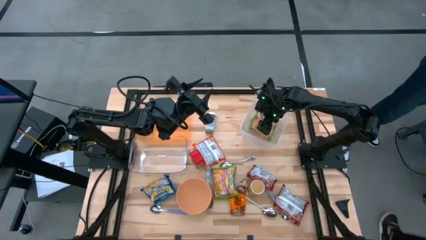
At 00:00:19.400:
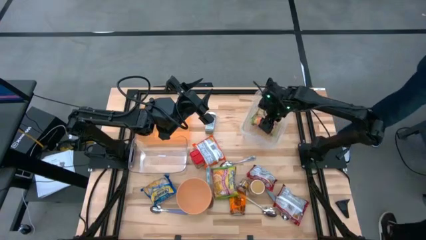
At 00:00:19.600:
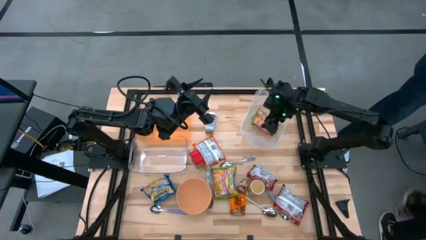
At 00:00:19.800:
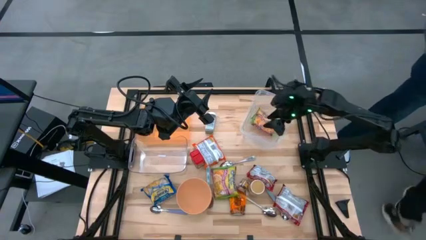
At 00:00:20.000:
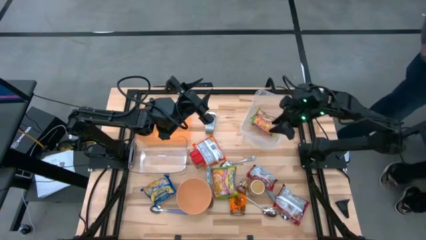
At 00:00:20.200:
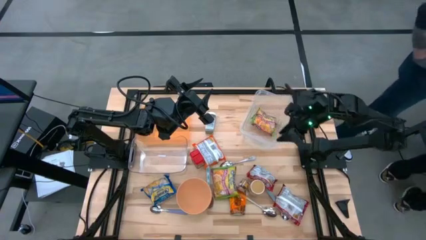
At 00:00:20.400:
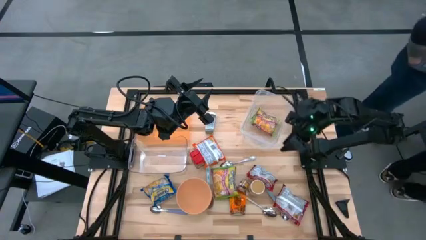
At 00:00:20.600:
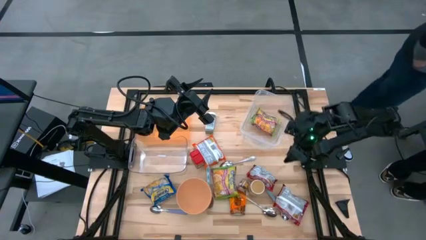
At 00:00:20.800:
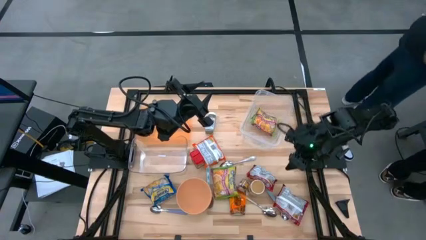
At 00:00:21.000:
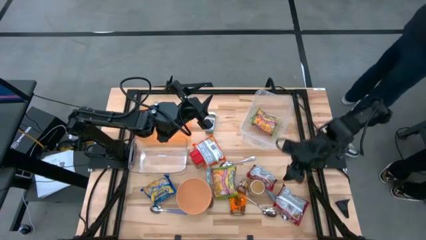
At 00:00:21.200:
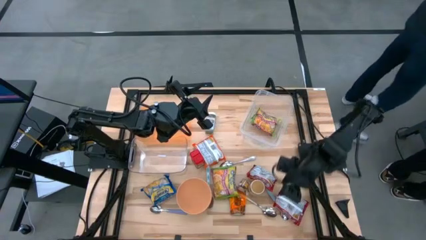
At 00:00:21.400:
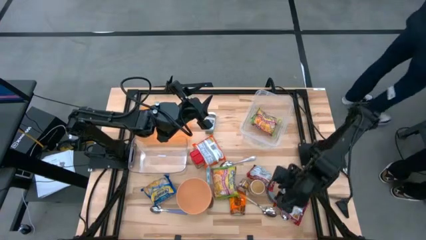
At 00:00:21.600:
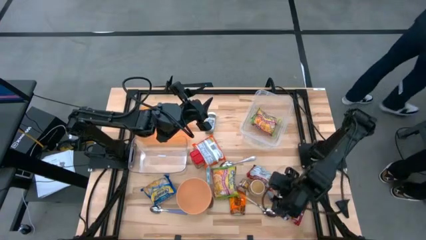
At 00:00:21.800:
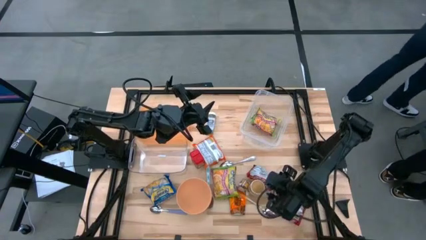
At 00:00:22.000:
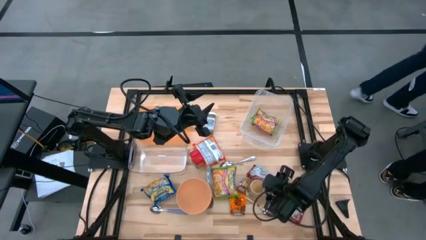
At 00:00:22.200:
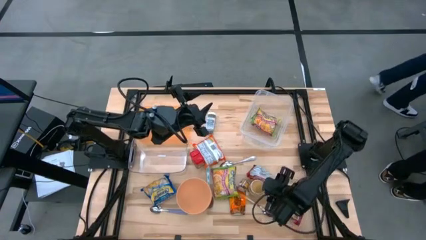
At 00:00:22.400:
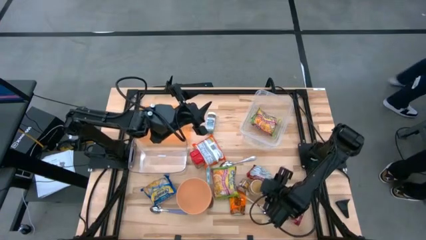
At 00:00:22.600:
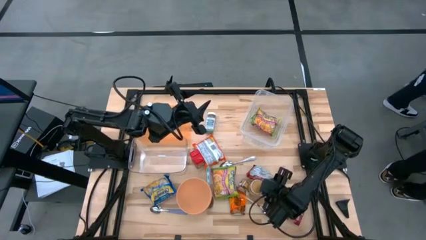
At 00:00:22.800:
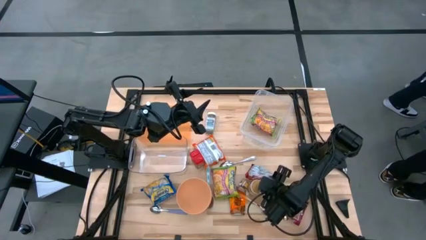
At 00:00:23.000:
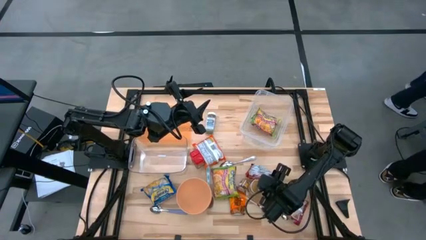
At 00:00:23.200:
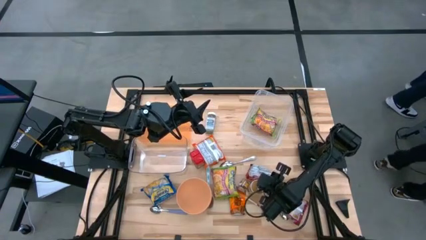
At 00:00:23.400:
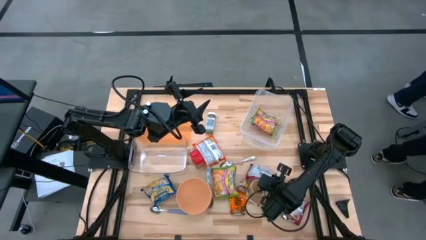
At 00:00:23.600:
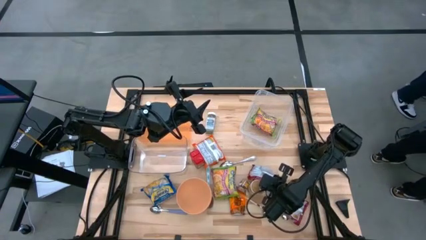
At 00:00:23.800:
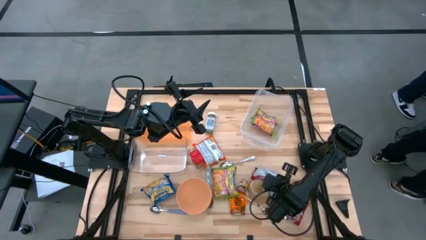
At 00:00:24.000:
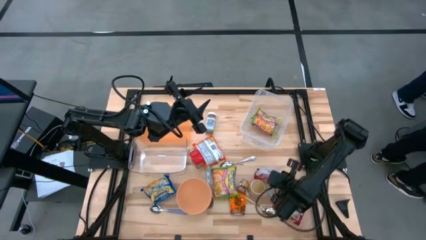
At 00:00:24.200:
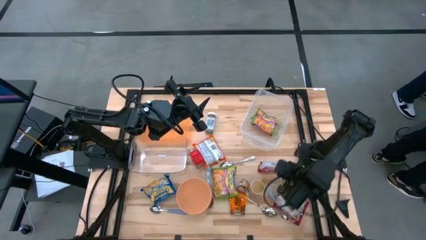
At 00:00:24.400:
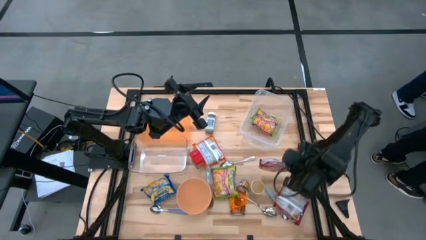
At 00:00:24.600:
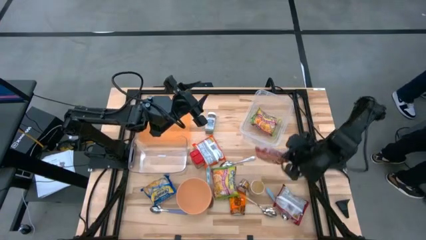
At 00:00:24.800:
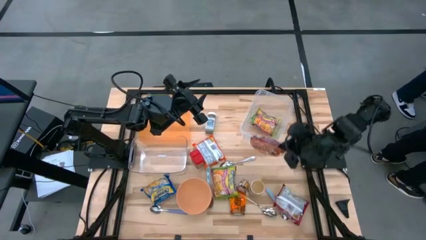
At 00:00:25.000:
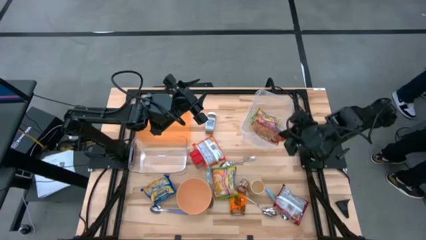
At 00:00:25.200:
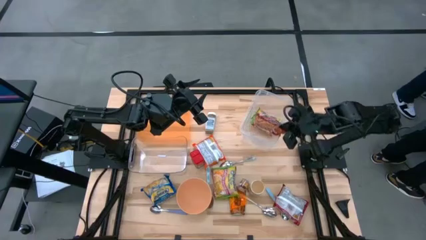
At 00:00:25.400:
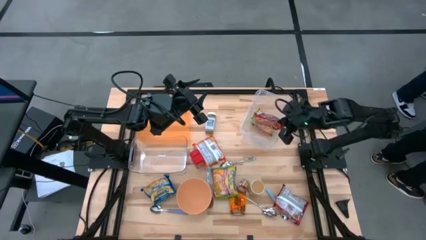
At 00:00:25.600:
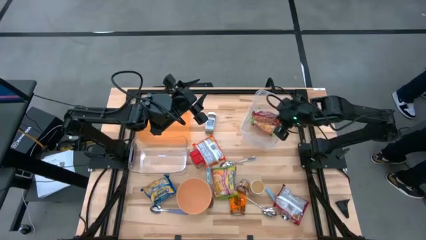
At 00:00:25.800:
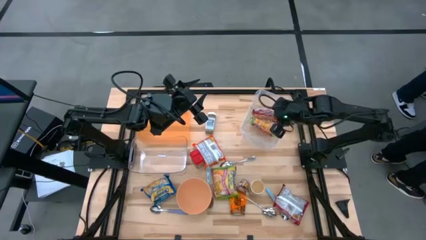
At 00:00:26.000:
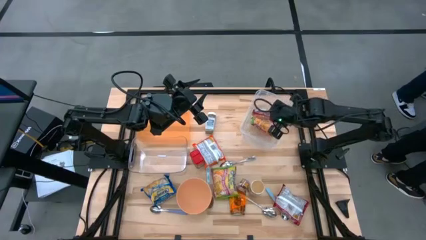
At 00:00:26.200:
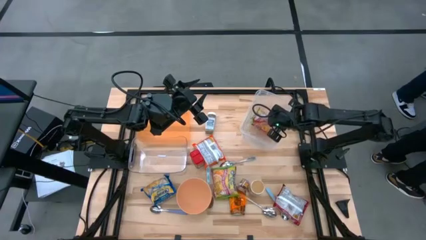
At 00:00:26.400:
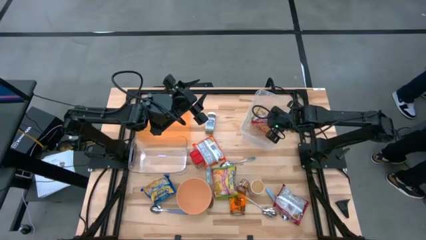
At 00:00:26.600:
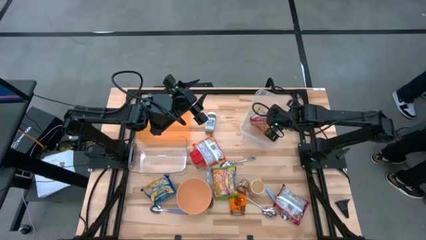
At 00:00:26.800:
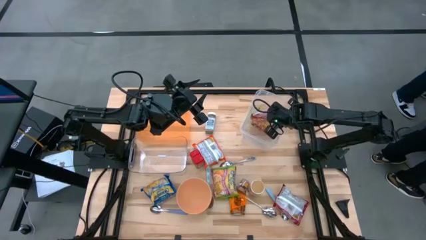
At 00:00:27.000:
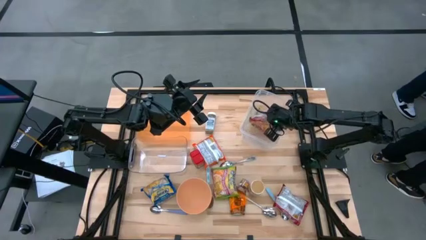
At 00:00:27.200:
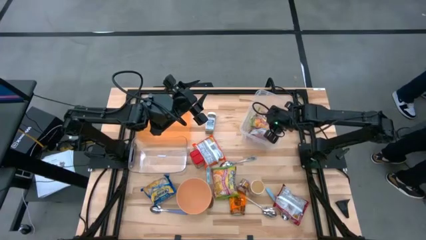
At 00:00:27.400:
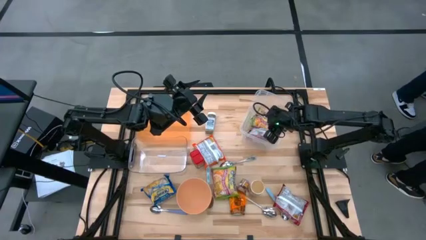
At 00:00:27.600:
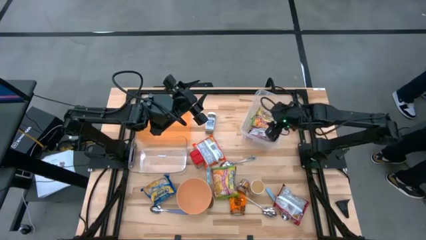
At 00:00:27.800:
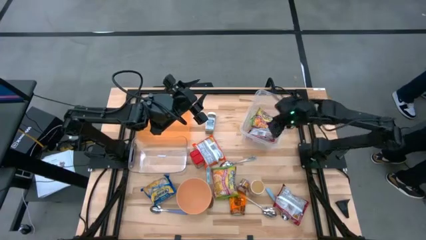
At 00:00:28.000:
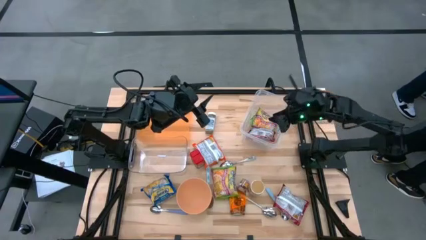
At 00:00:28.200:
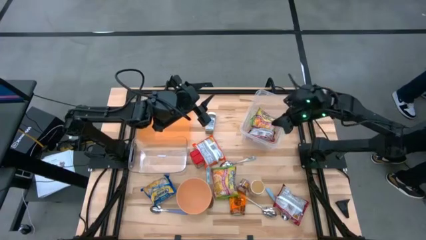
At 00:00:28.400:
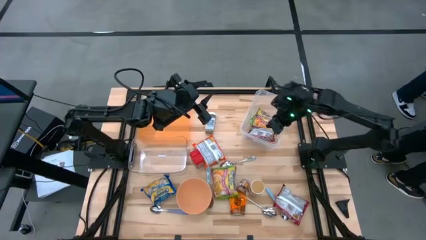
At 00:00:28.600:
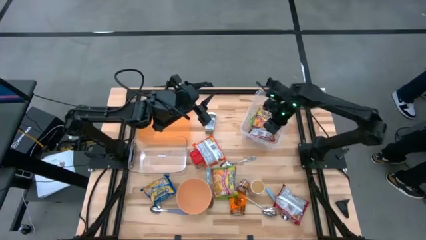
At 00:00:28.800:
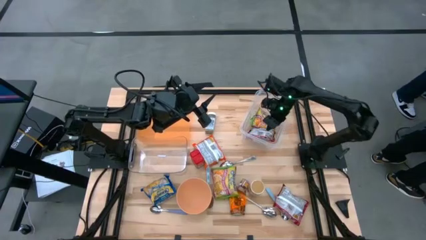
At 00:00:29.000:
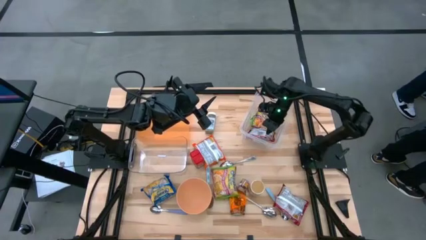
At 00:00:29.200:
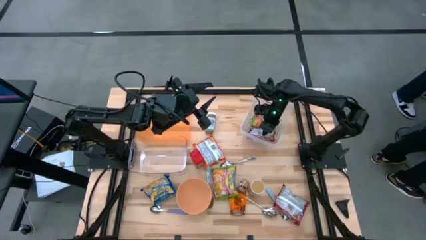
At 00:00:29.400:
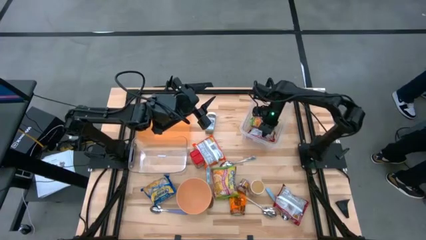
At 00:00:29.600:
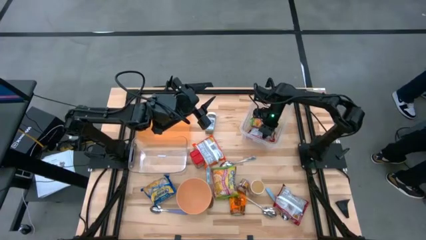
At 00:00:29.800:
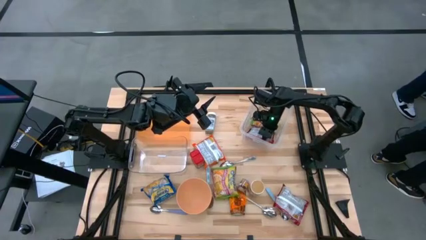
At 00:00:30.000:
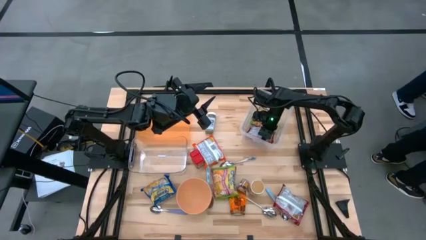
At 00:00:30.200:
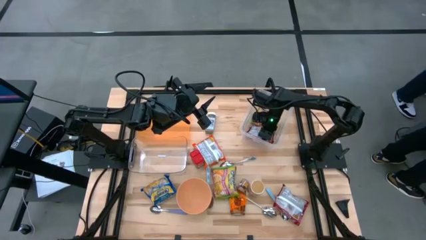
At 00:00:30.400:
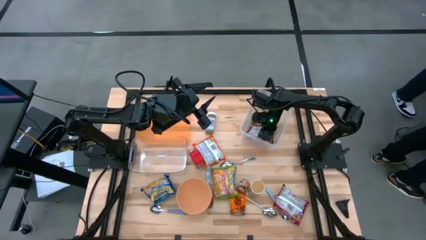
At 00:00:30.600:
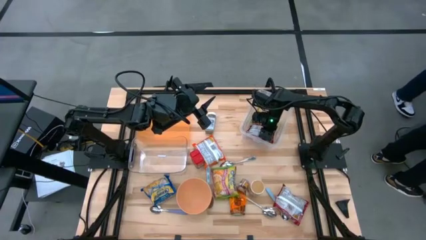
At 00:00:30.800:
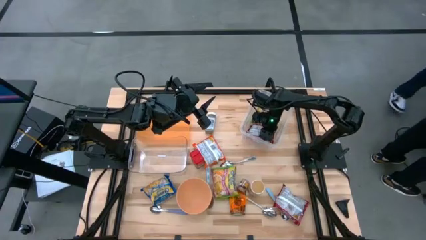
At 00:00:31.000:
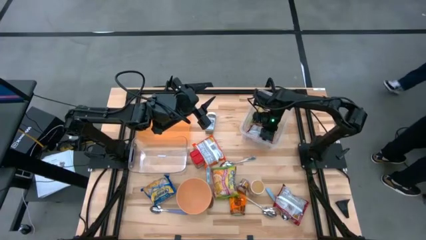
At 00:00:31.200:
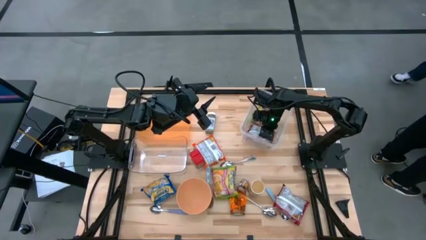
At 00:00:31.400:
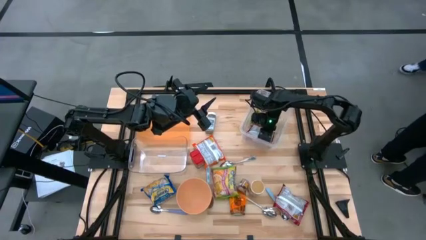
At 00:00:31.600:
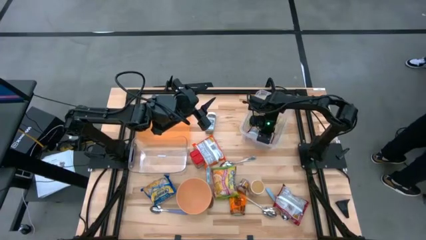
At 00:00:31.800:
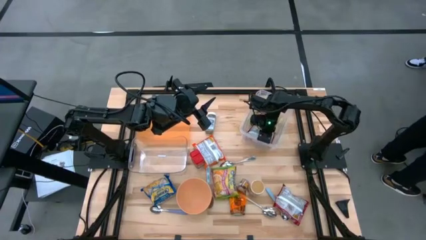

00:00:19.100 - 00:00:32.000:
Task: Pick & Place Food Item
Put the top red noodle pack into the top transparent bin
